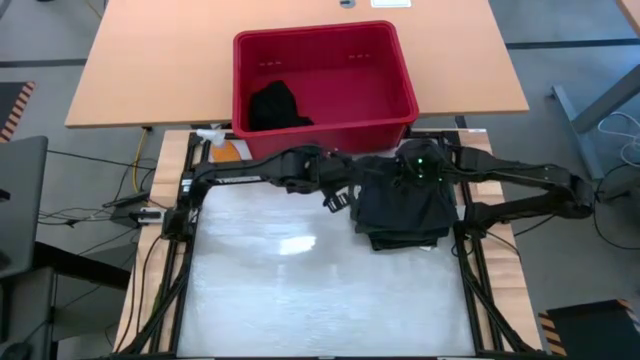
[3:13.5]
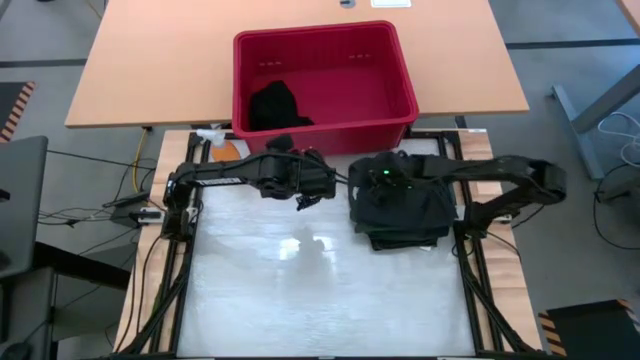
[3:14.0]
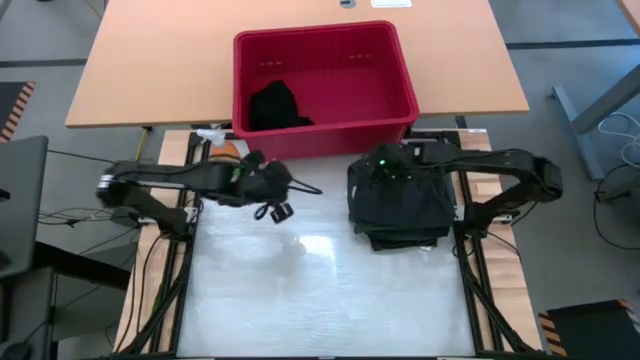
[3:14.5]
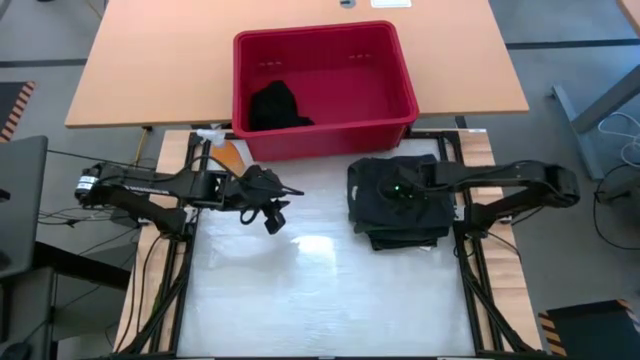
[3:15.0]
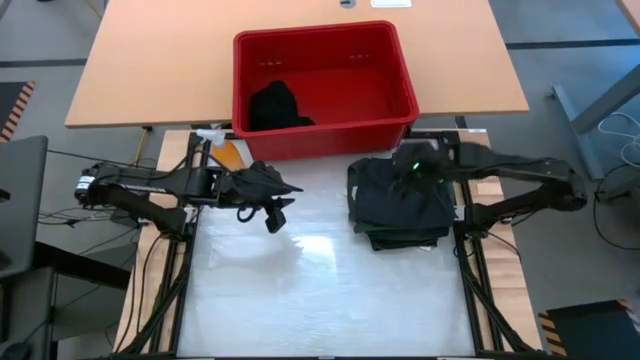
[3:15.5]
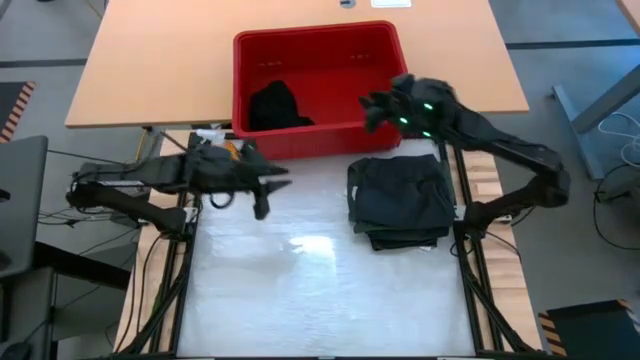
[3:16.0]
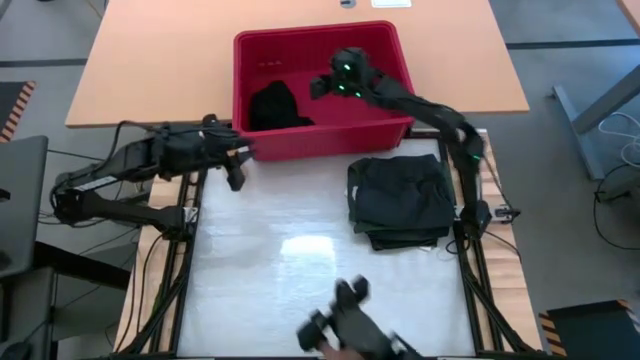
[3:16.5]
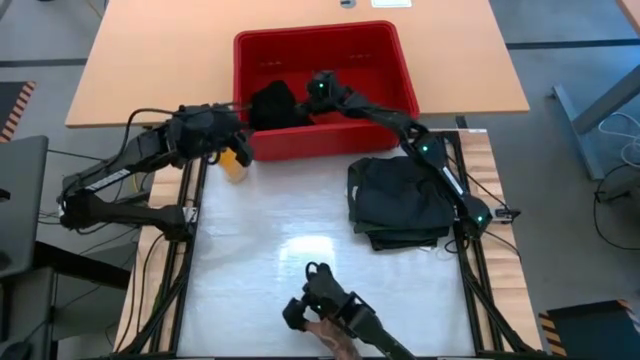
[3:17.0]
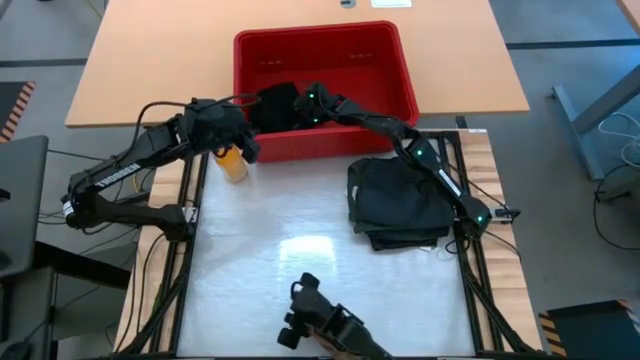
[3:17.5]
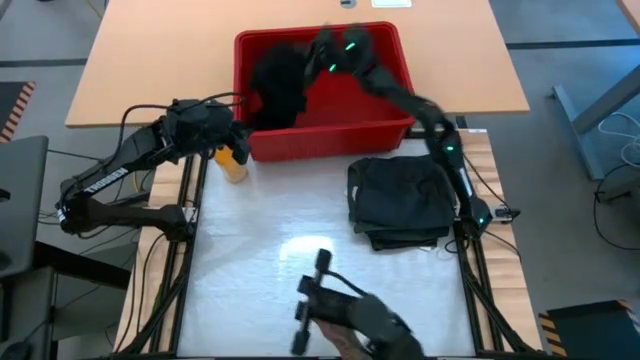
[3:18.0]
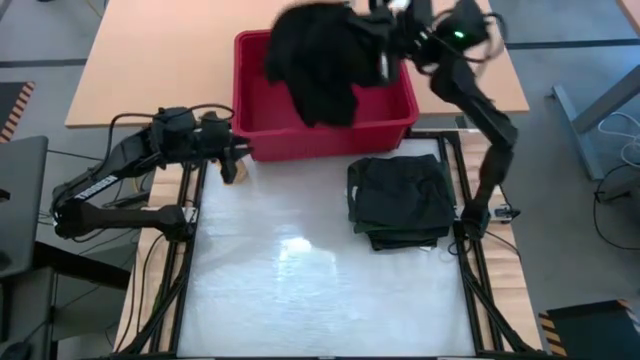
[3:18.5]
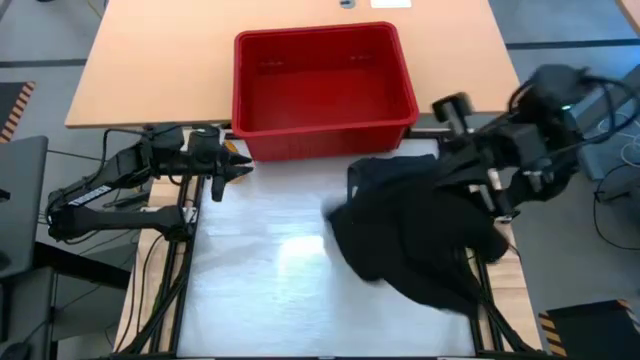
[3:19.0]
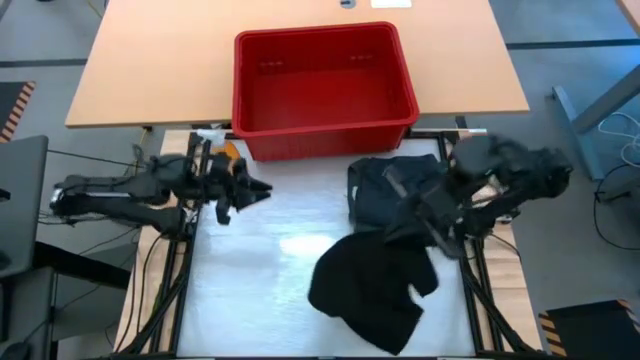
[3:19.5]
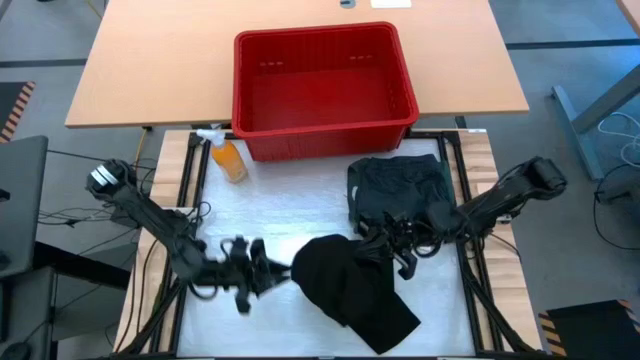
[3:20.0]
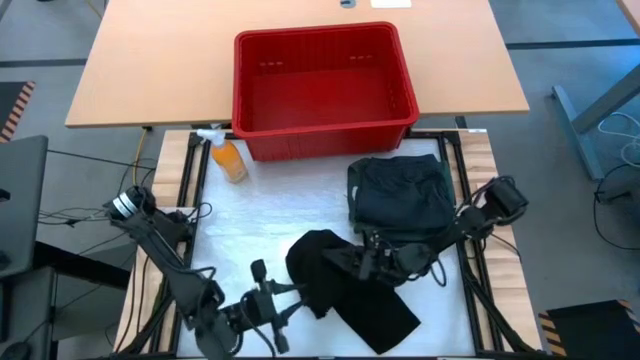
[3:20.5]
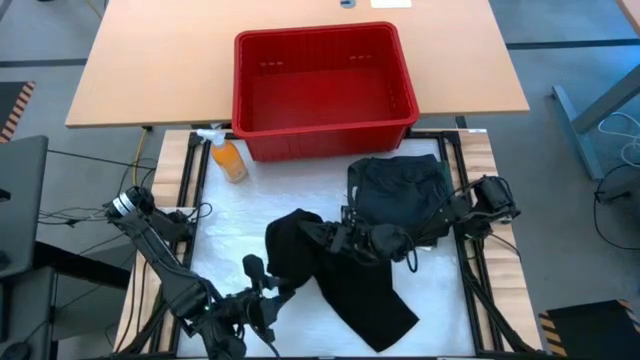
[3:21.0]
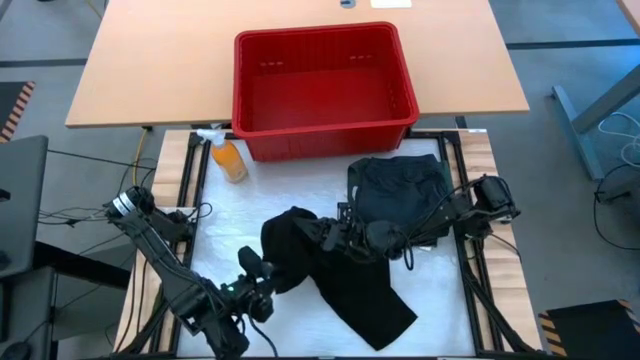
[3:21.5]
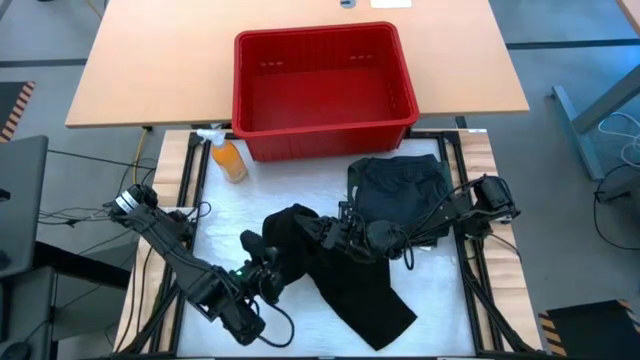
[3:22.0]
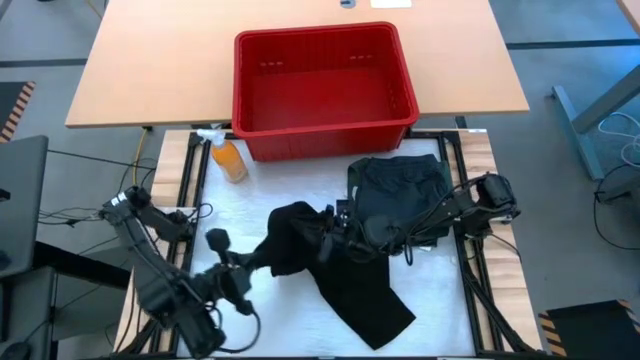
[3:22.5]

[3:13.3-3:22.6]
Task: Fold Laundry from Bin
Remove the black shirt from the red bin

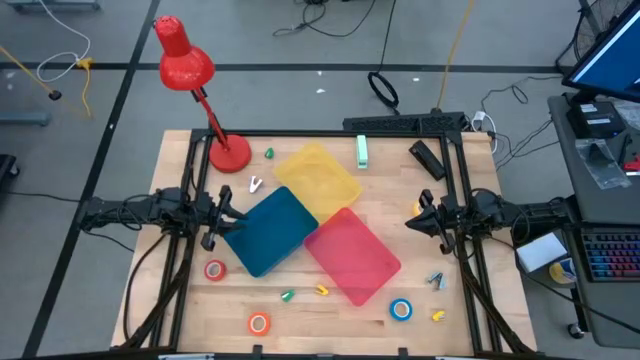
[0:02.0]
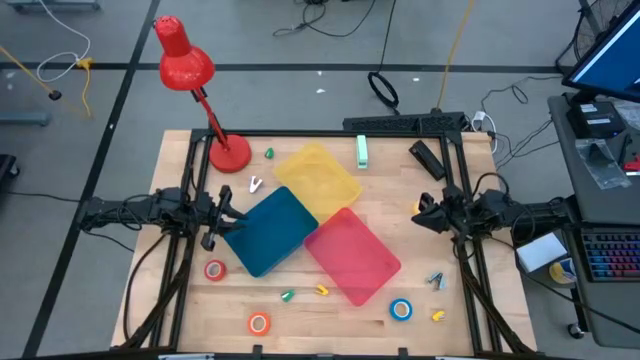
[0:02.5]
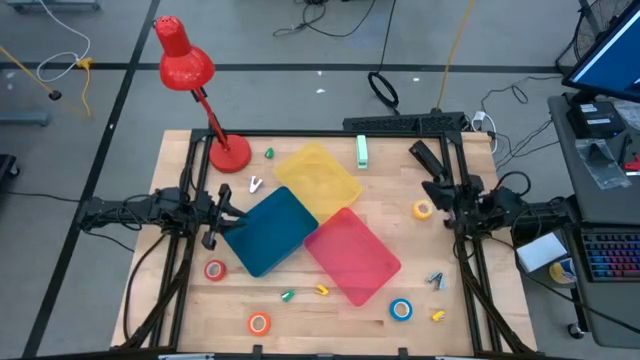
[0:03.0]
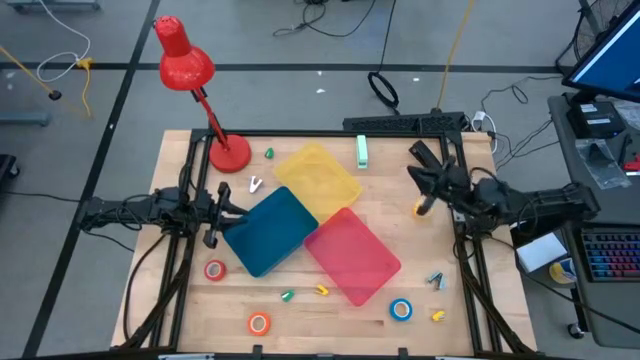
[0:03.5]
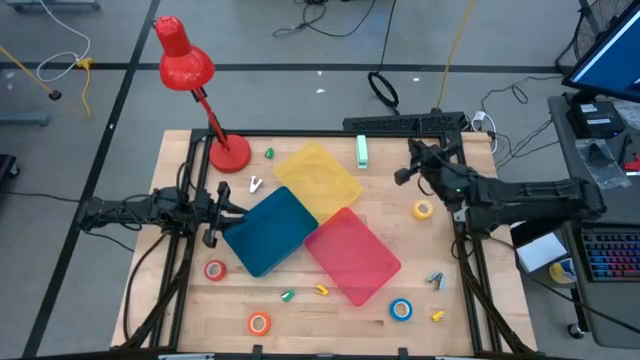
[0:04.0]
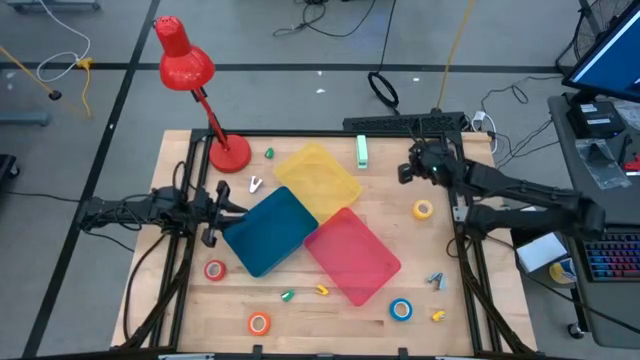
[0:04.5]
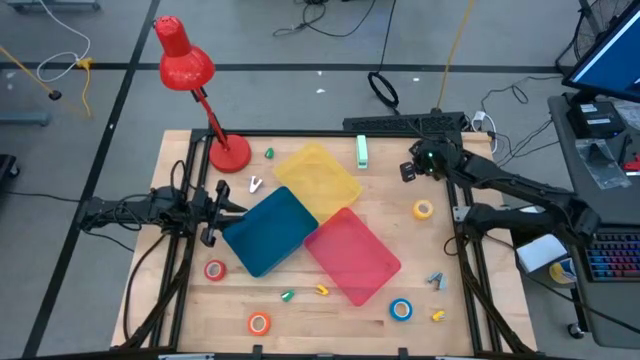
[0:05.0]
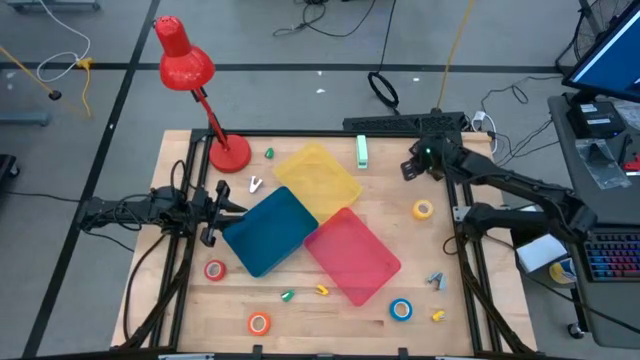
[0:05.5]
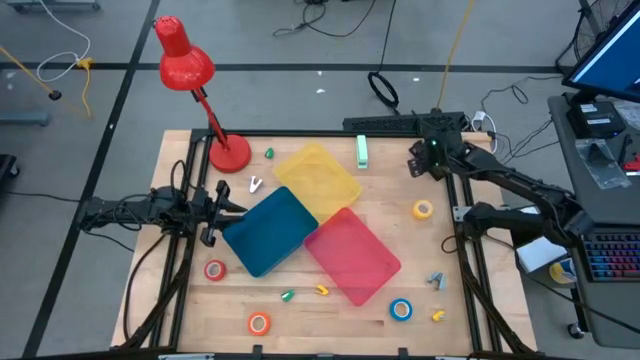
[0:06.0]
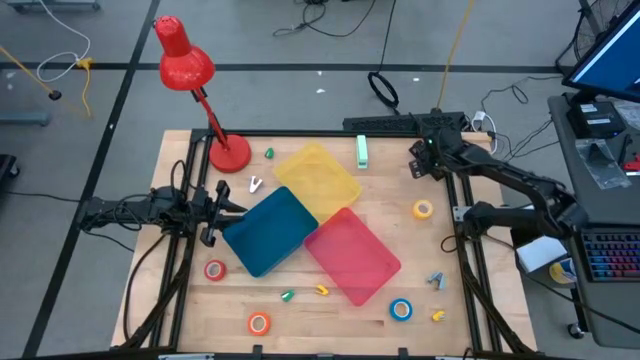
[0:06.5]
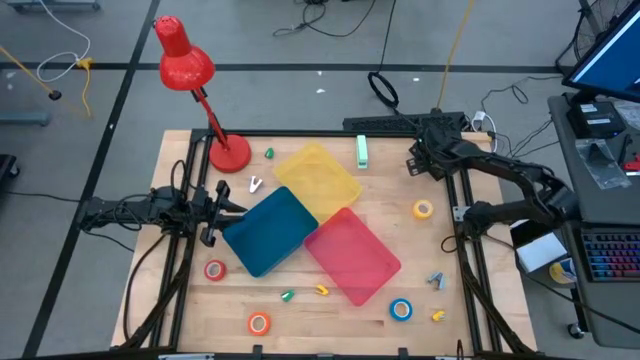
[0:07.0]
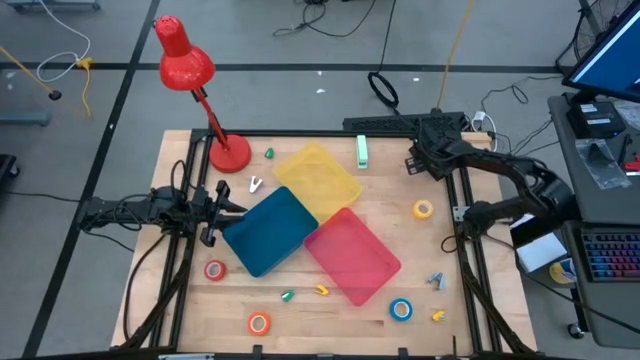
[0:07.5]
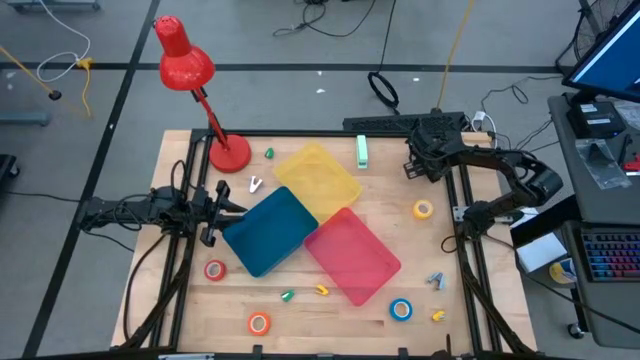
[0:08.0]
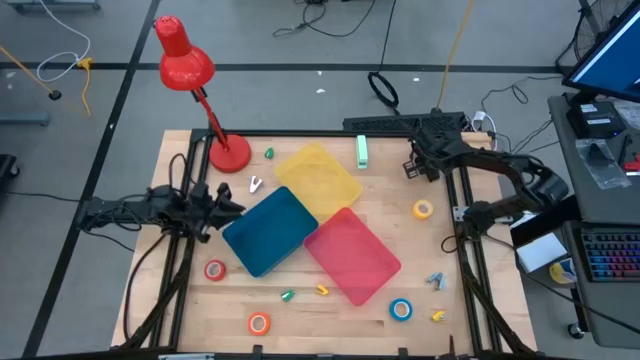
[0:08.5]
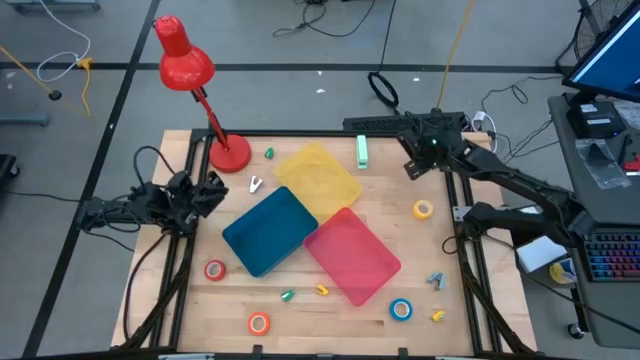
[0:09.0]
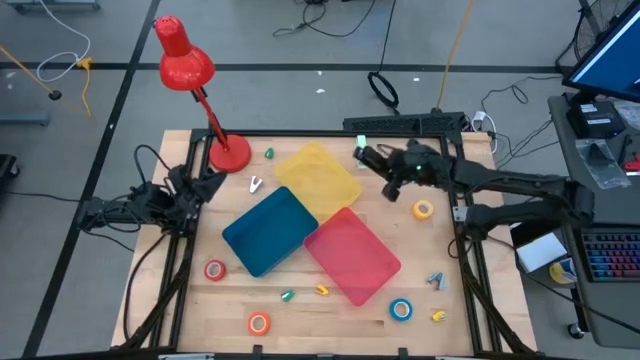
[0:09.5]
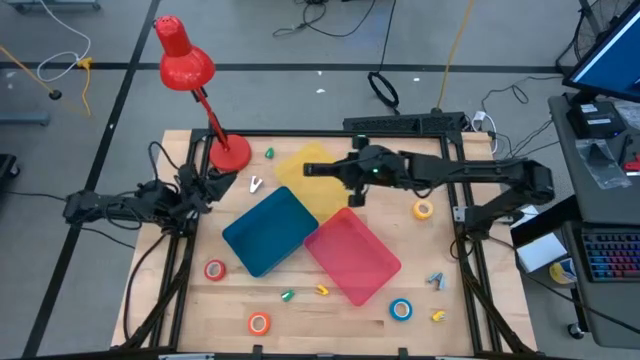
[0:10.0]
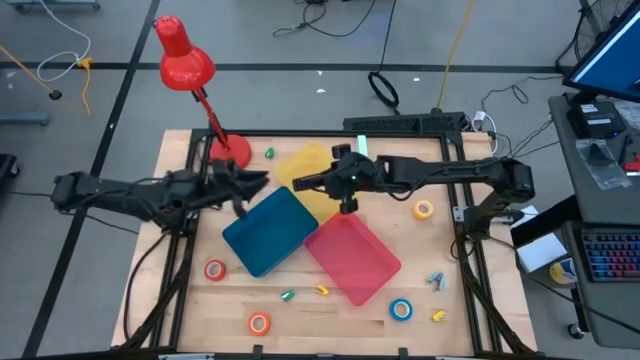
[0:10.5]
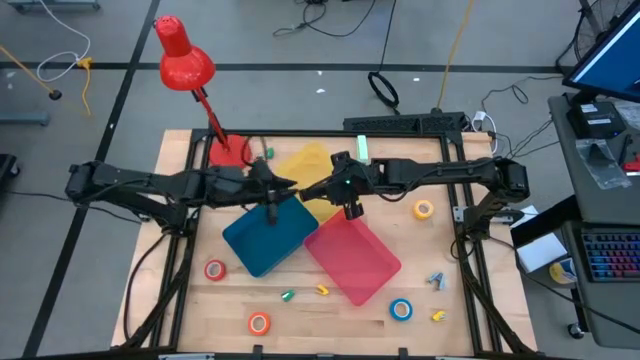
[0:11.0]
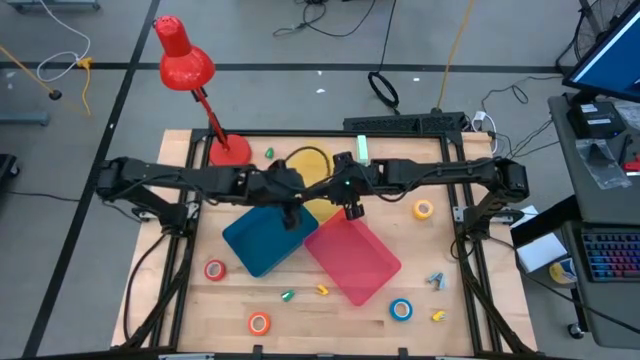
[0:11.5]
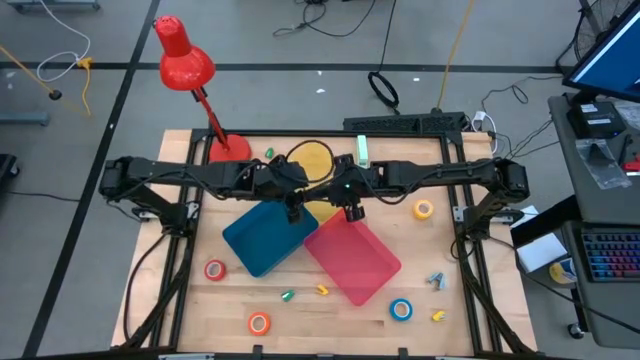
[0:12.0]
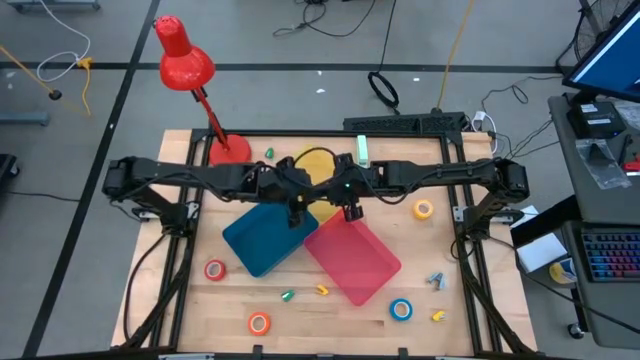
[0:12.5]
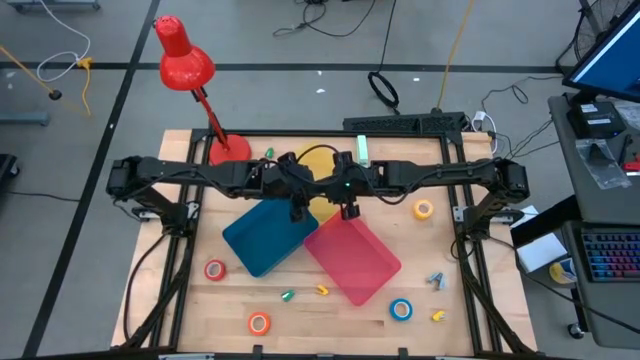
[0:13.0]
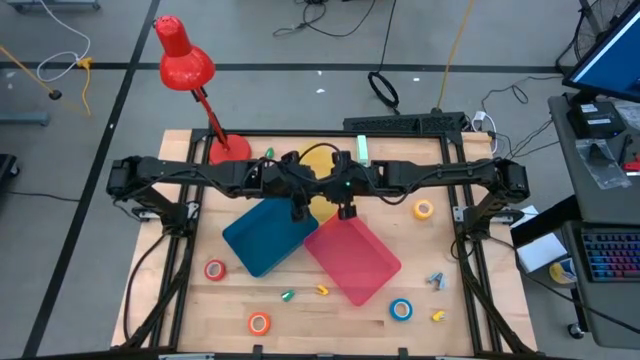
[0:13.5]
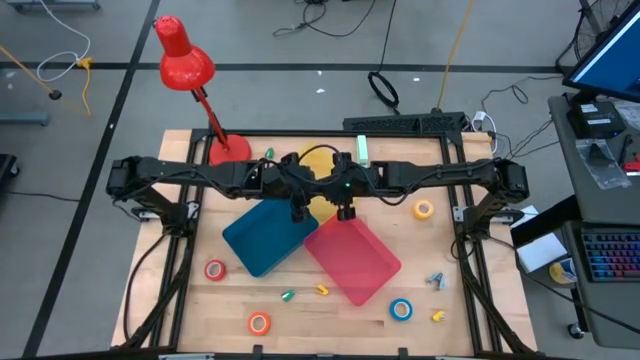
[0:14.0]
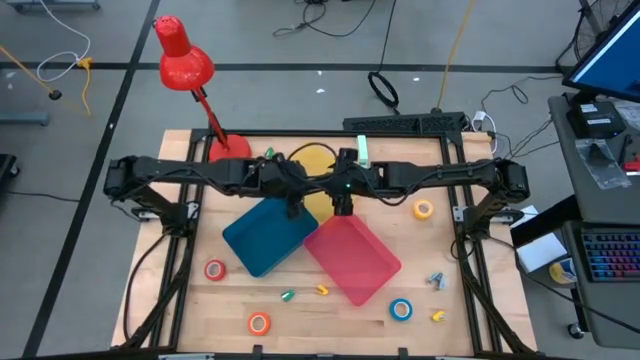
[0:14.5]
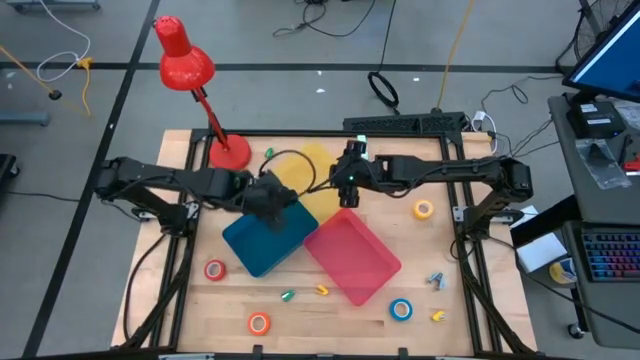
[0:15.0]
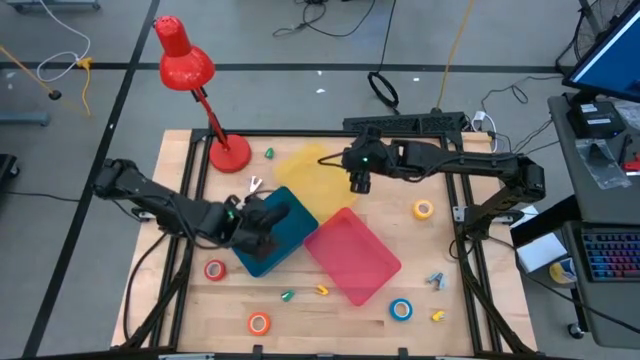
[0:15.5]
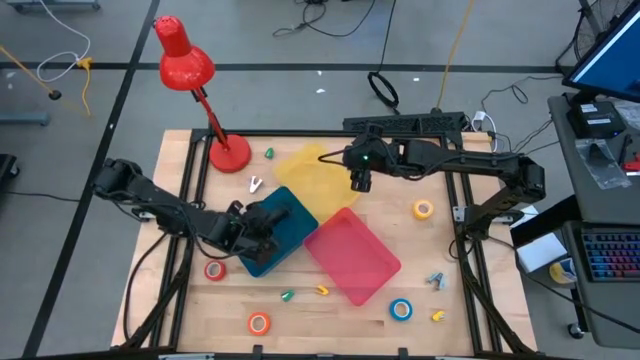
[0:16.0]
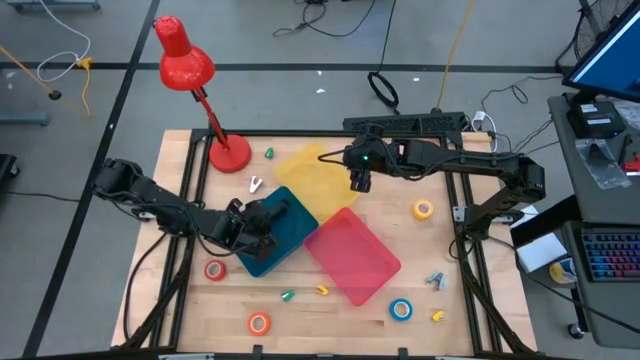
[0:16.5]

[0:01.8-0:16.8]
Task: Pick and place Stapler, Stapler remover, tape
Put the large black stapler into the blue bin
